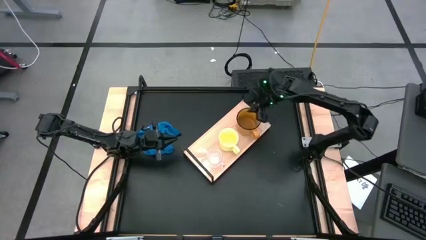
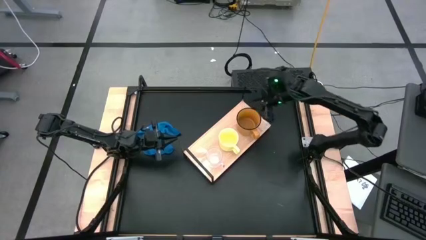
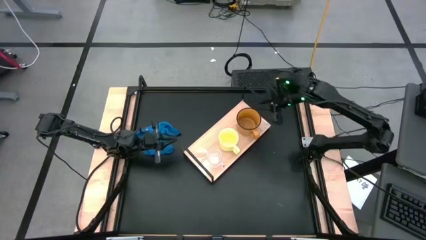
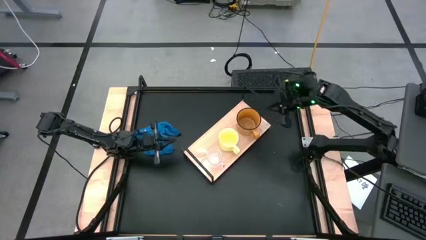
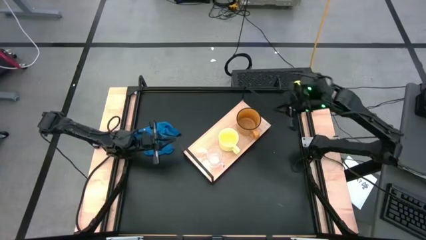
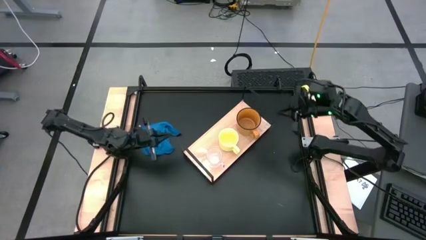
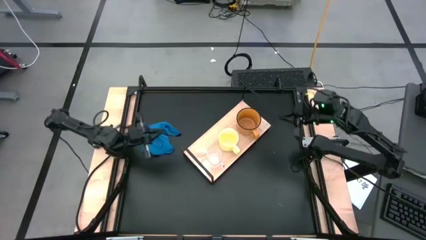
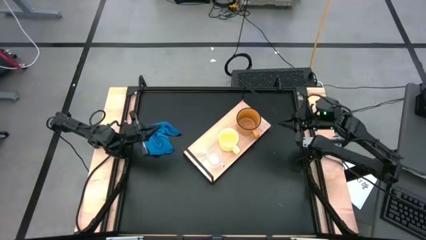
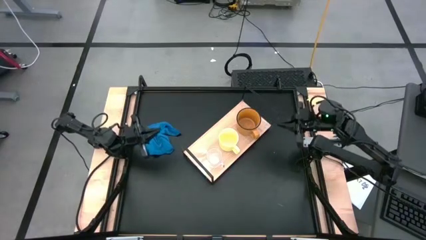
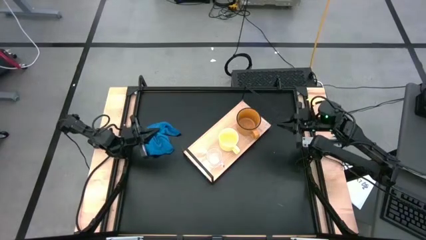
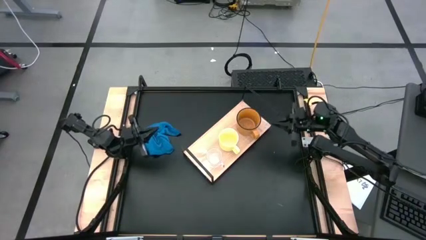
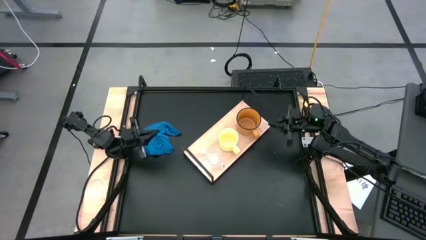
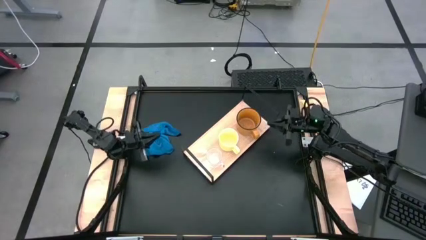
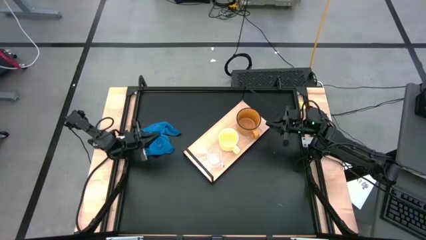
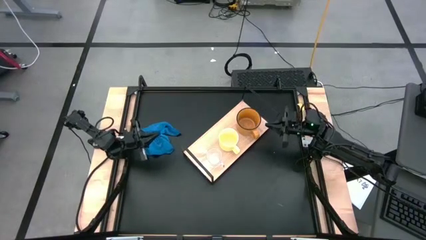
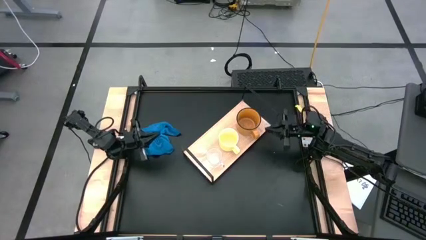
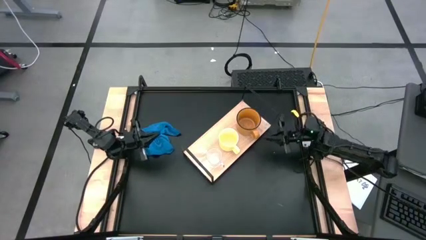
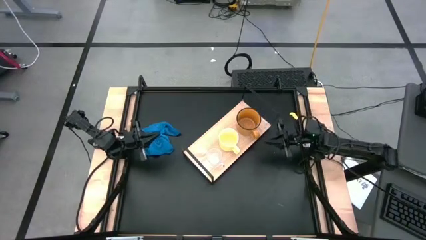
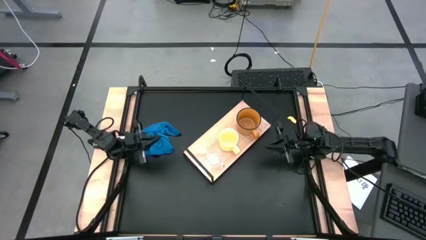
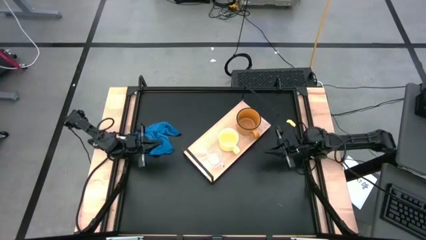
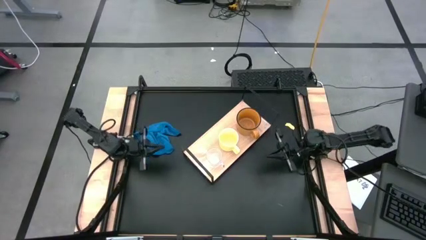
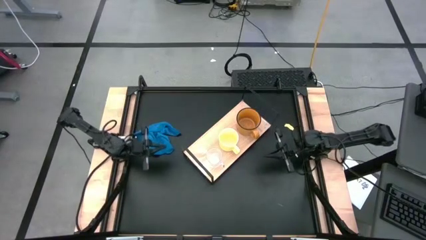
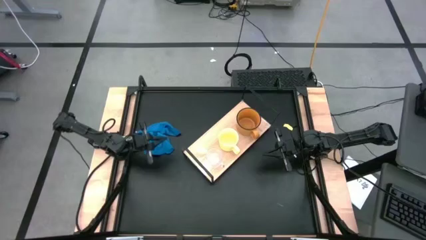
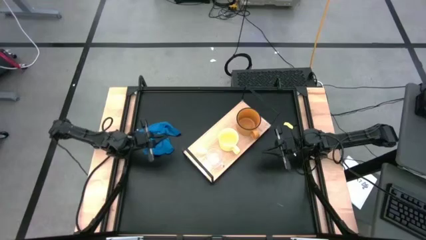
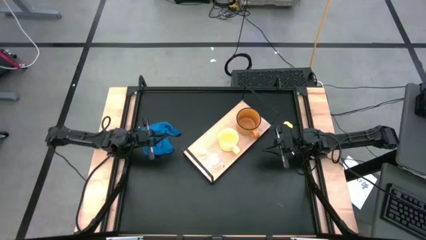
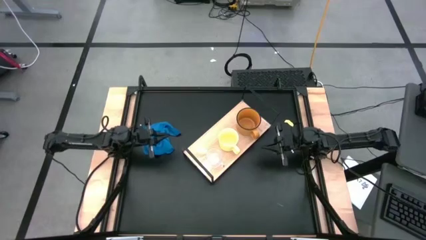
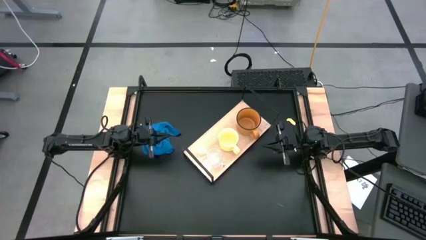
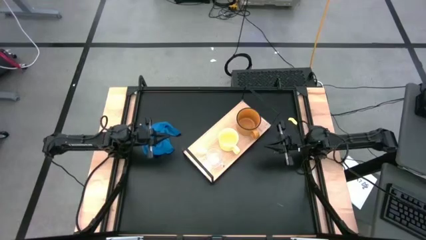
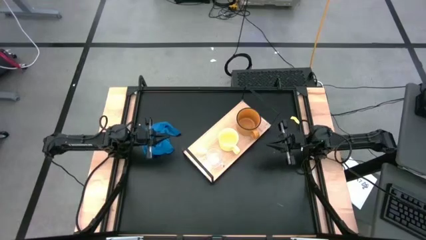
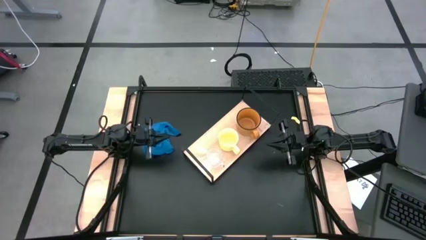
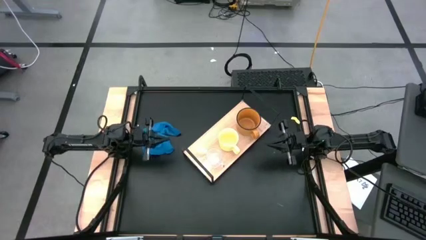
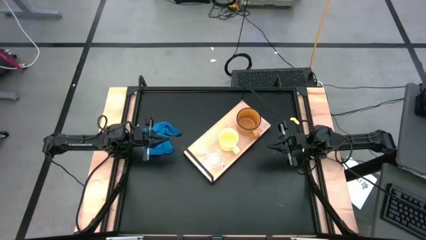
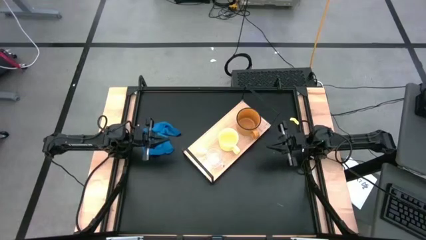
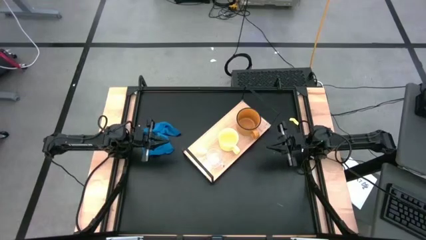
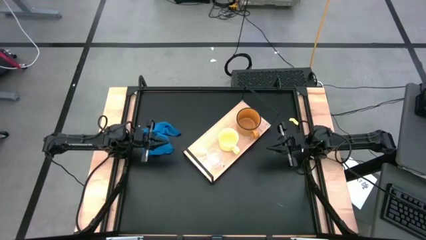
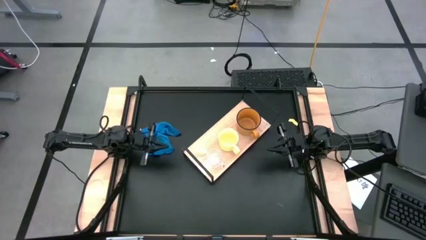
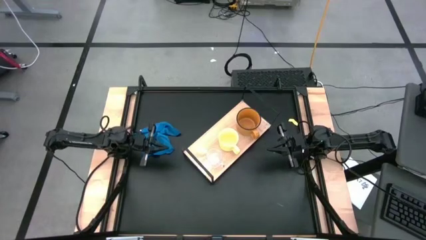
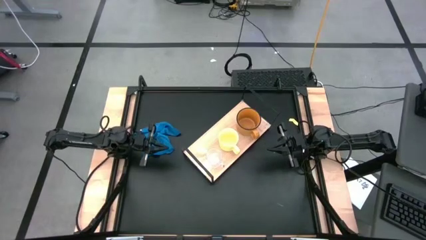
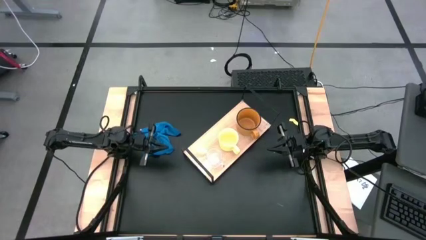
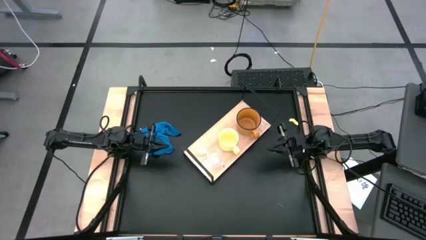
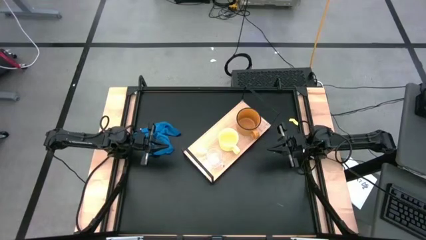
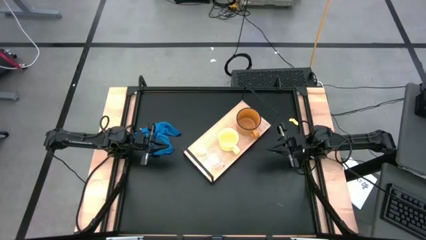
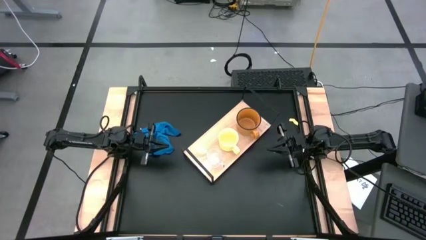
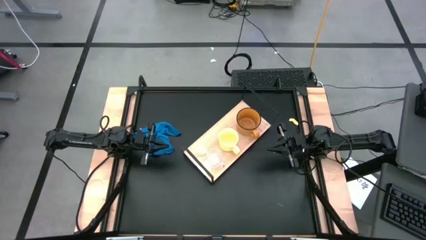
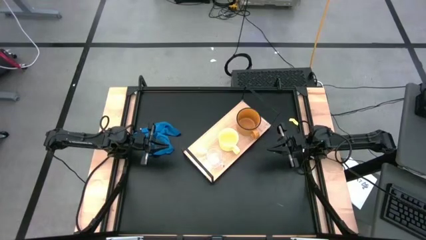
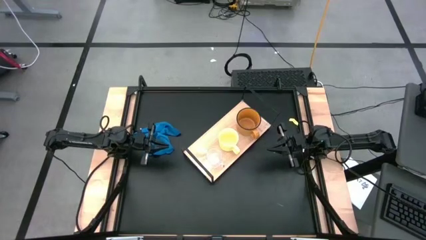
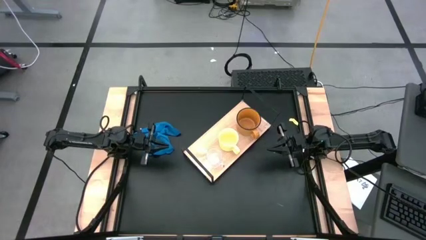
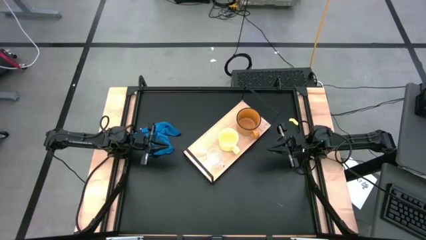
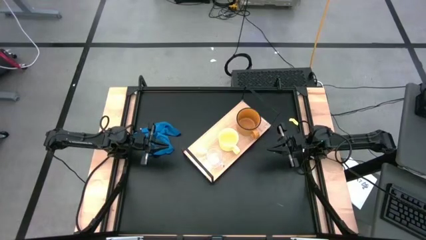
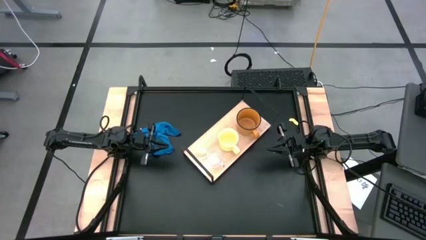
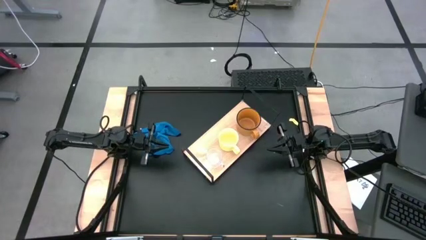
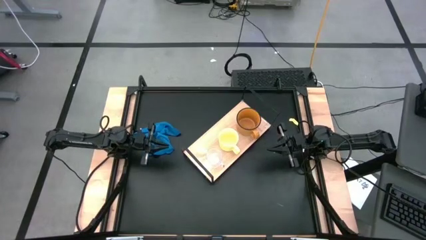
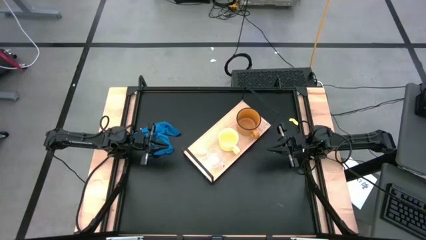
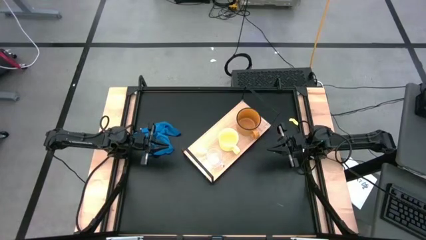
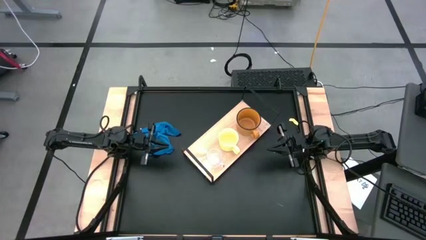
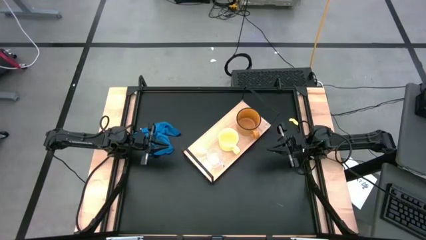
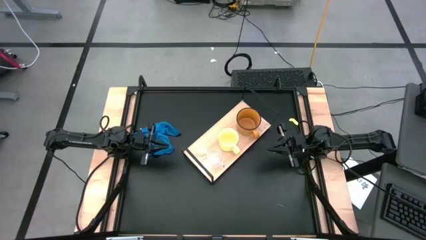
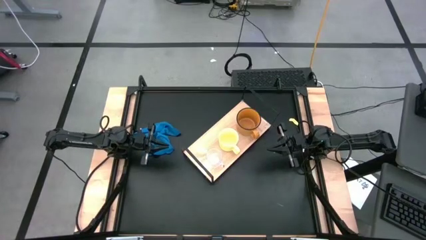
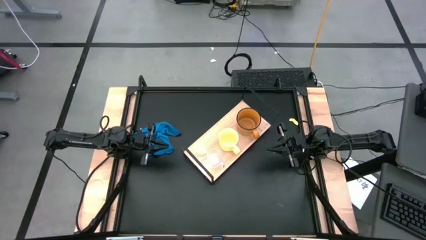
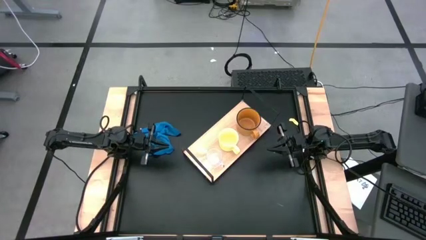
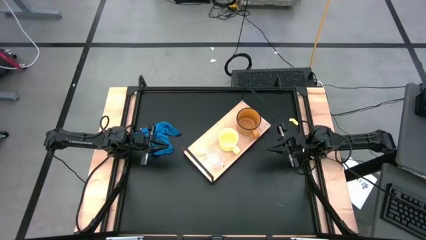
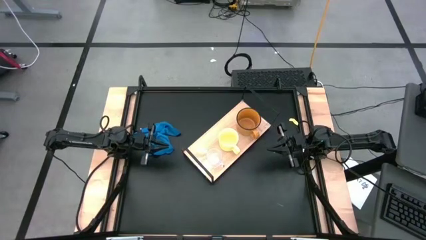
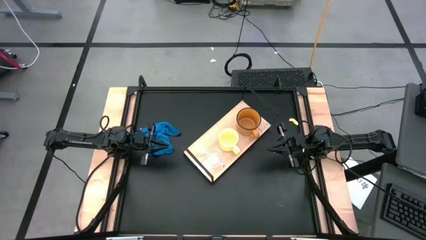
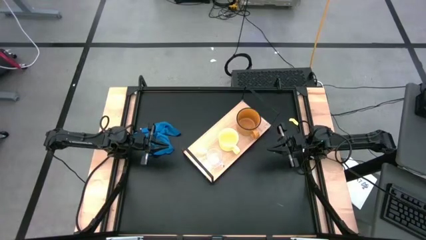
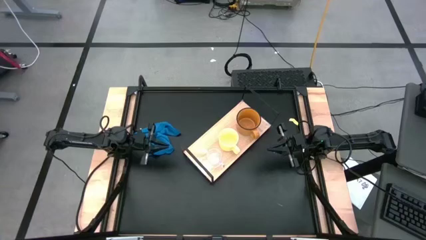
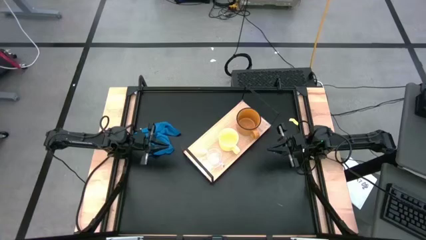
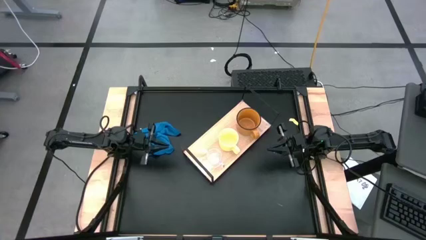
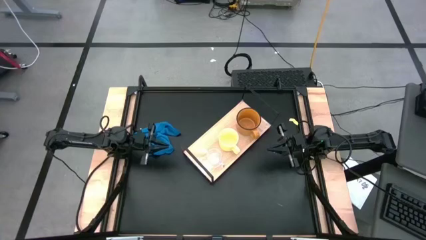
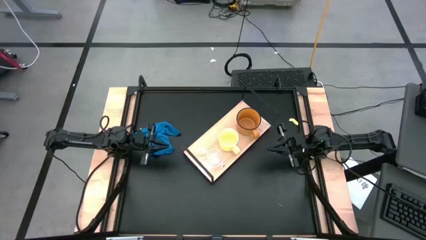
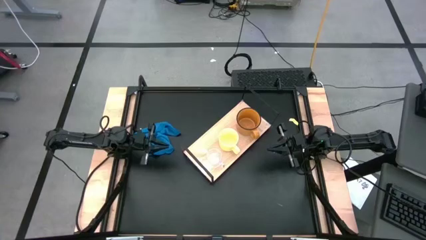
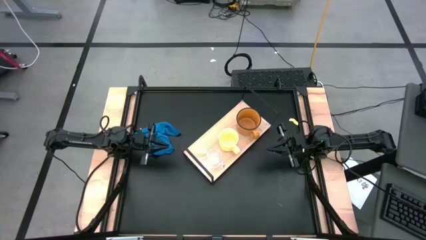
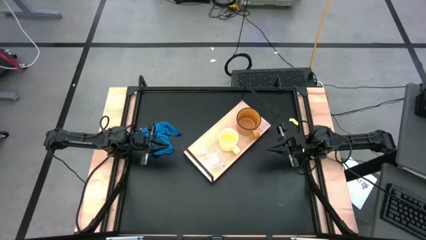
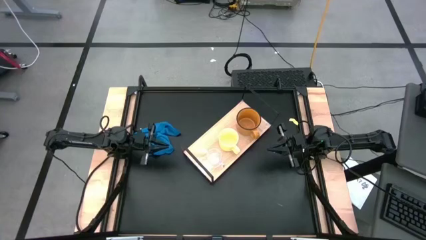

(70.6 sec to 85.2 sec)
Task: Stack small to large cups/mugs on shelf
Return to Home Position

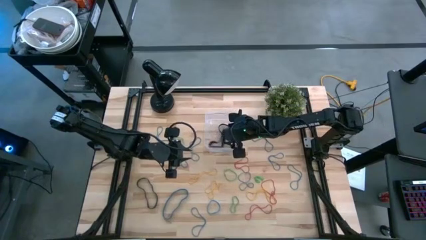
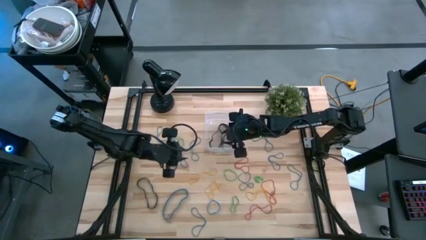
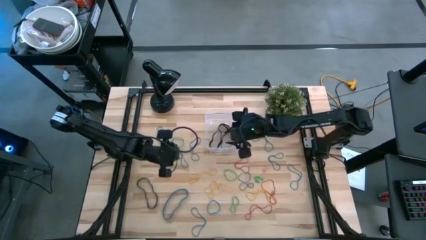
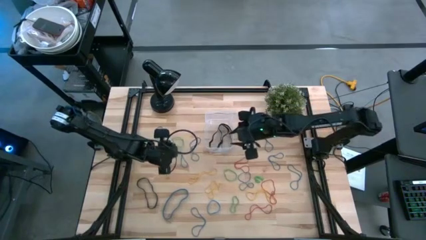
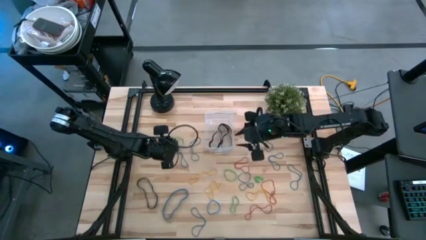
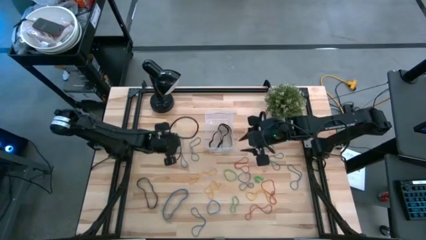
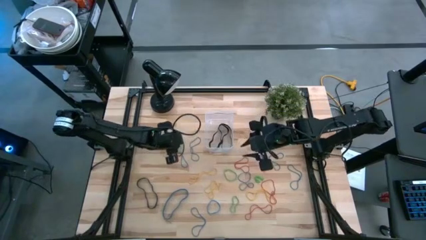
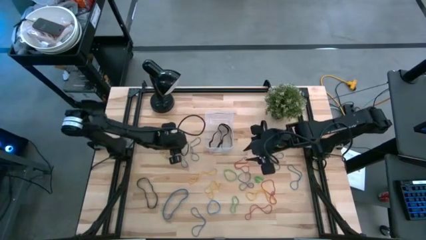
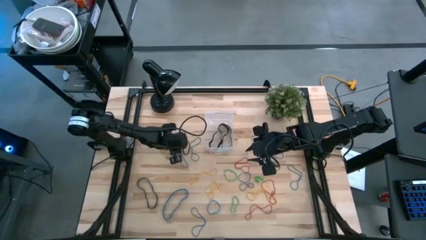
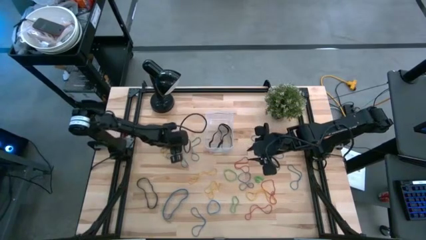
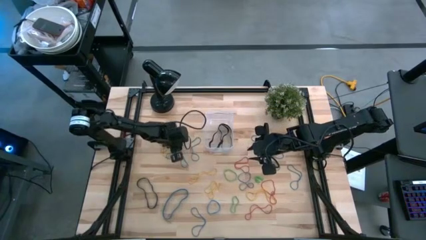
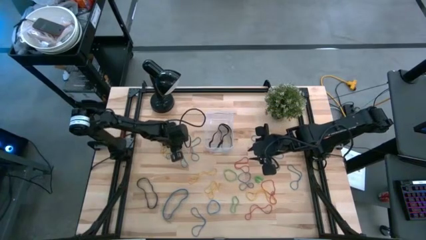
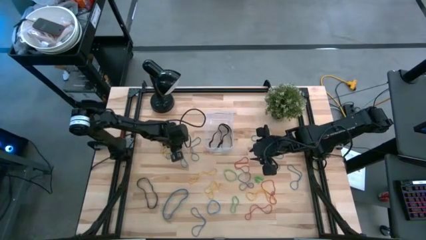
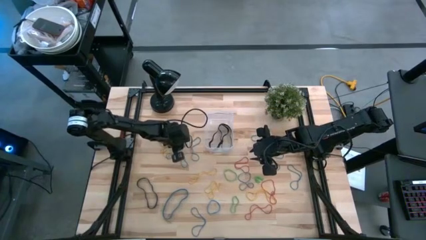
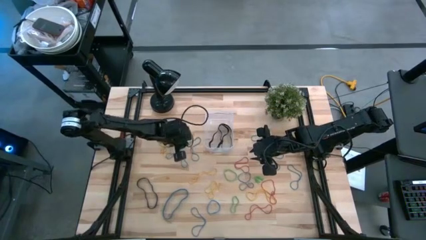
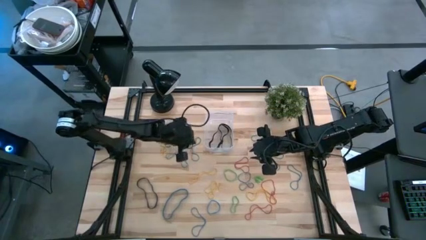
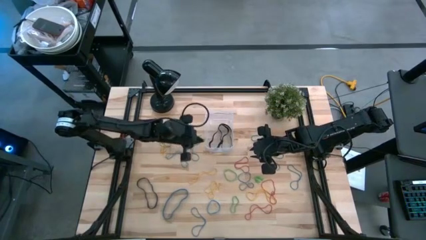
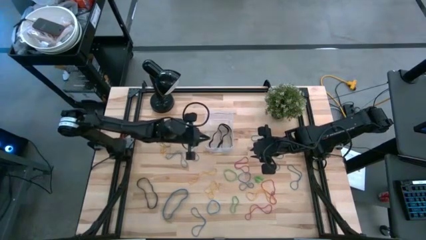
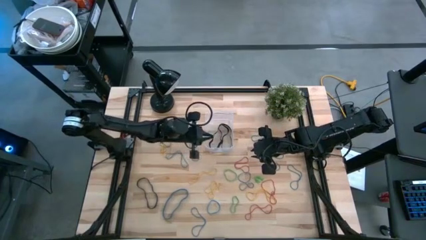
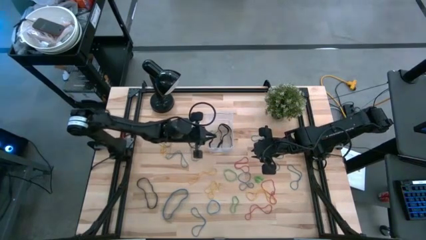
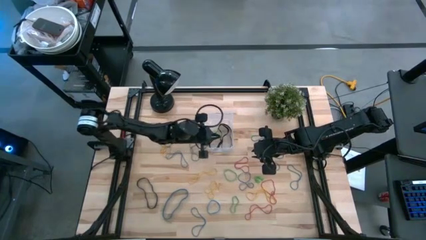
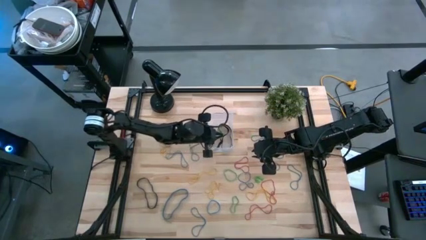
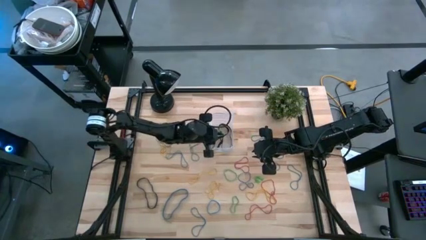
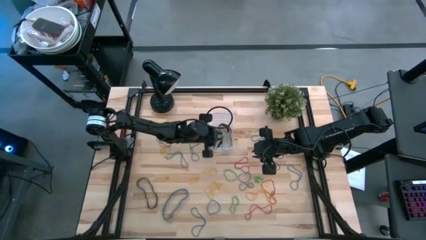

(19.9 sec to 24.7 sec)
Task: Pick and place rubber bands into bin
Put green rubberband into the transparent bin
